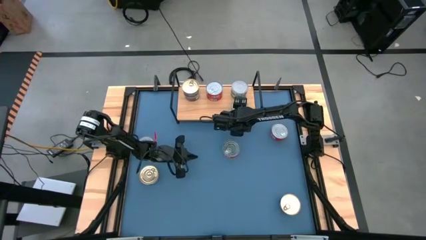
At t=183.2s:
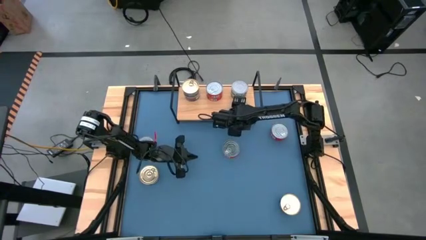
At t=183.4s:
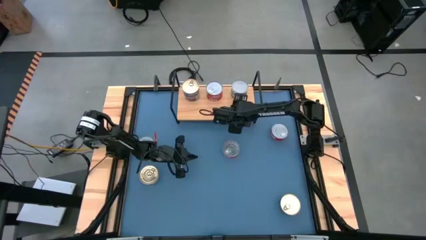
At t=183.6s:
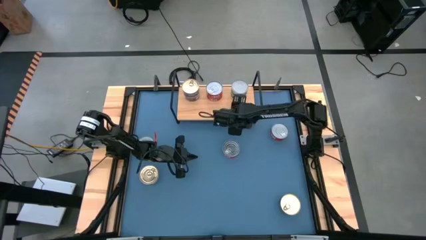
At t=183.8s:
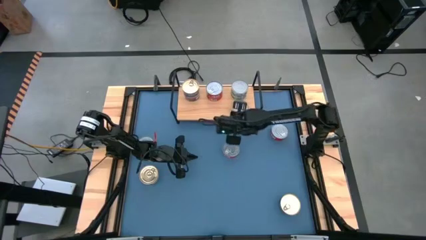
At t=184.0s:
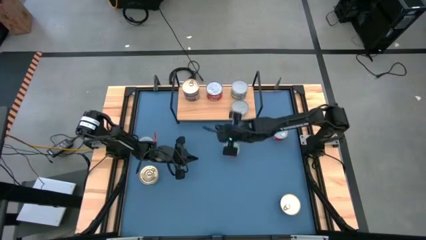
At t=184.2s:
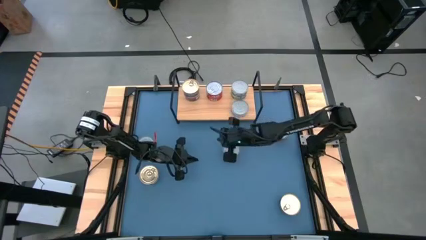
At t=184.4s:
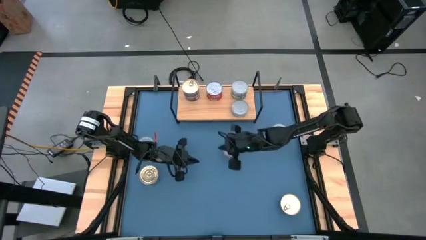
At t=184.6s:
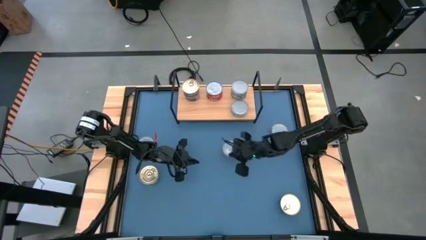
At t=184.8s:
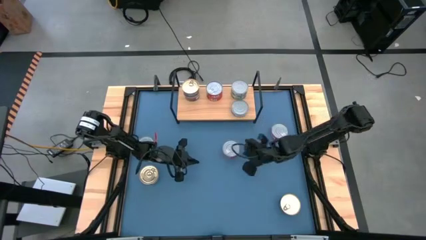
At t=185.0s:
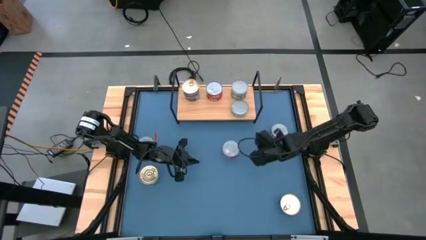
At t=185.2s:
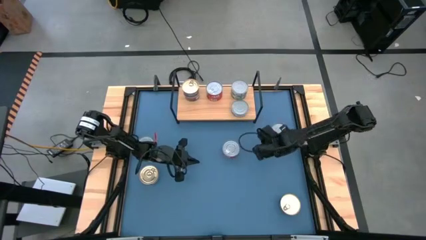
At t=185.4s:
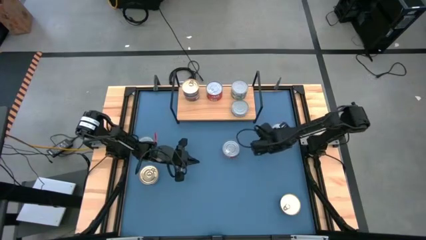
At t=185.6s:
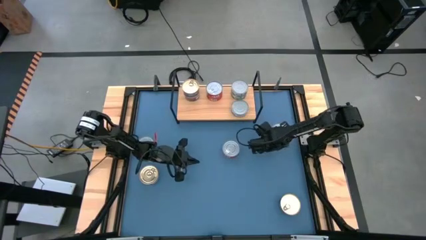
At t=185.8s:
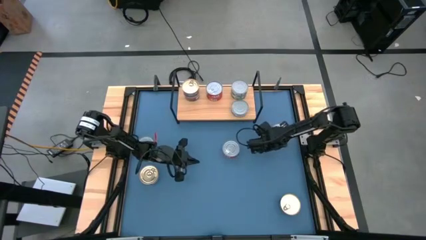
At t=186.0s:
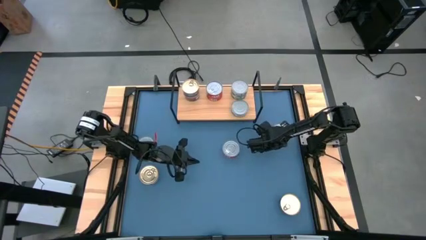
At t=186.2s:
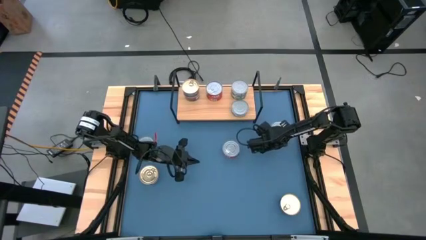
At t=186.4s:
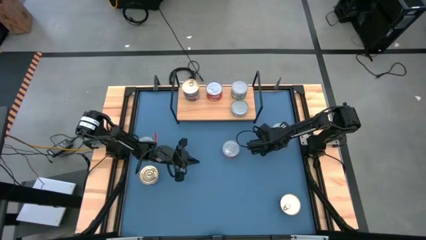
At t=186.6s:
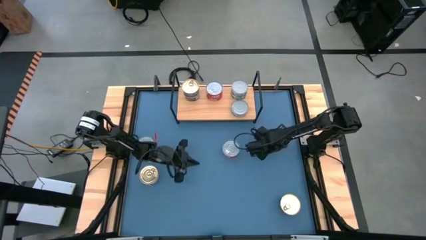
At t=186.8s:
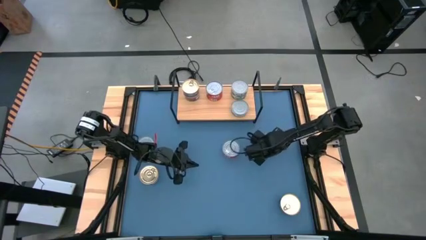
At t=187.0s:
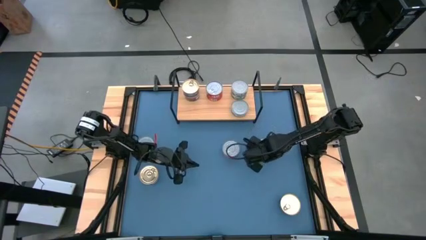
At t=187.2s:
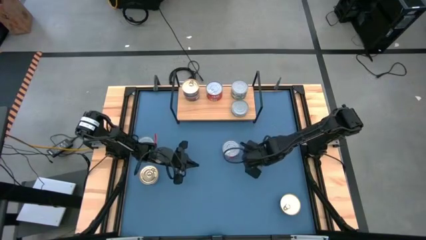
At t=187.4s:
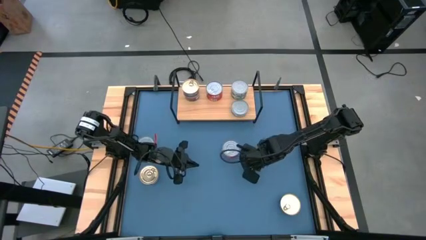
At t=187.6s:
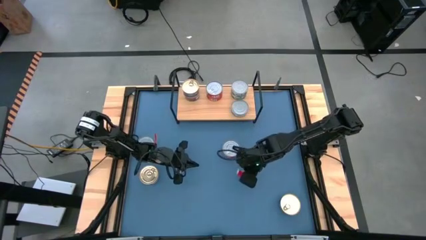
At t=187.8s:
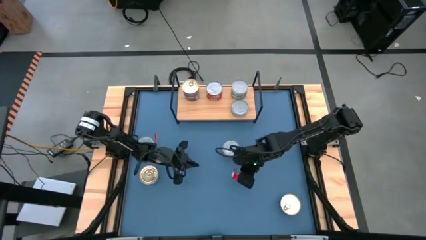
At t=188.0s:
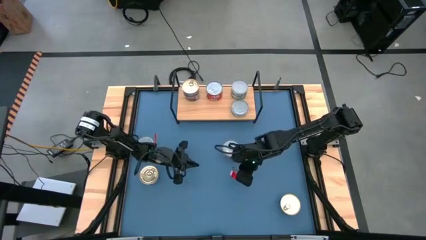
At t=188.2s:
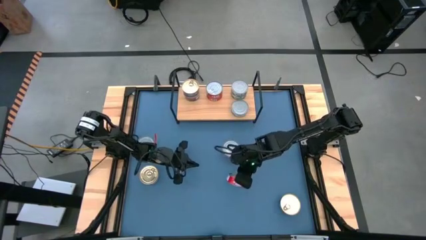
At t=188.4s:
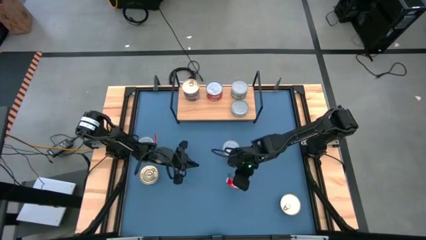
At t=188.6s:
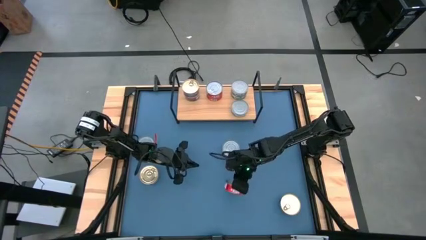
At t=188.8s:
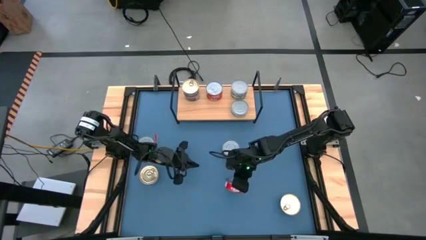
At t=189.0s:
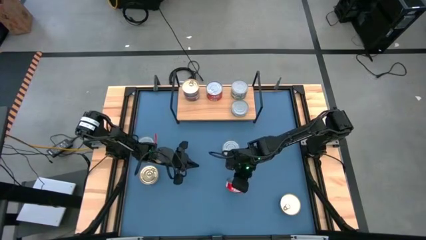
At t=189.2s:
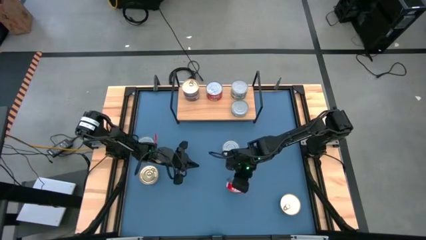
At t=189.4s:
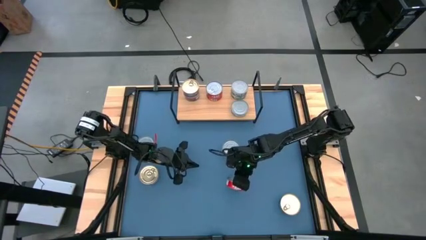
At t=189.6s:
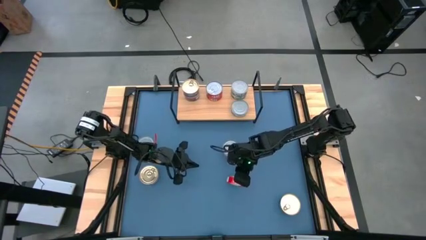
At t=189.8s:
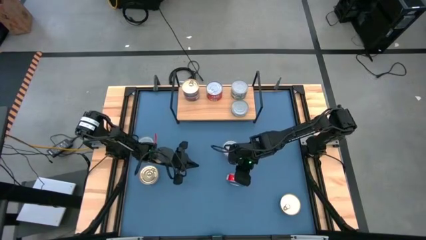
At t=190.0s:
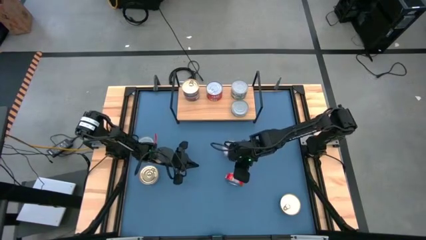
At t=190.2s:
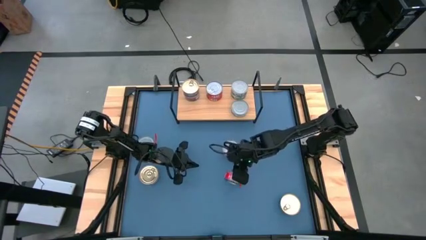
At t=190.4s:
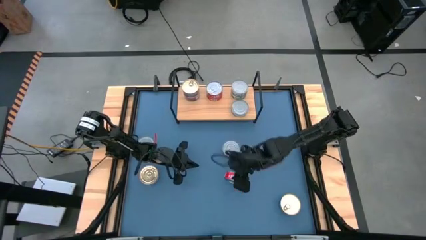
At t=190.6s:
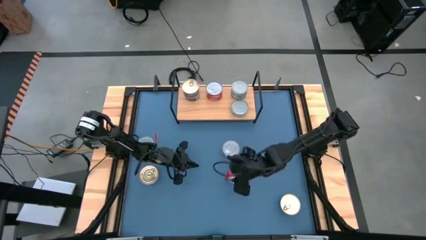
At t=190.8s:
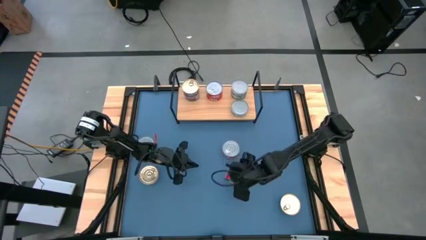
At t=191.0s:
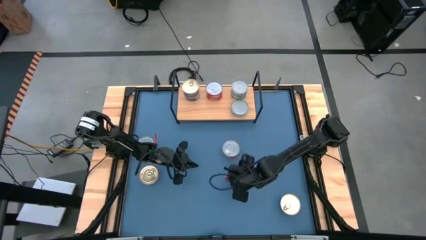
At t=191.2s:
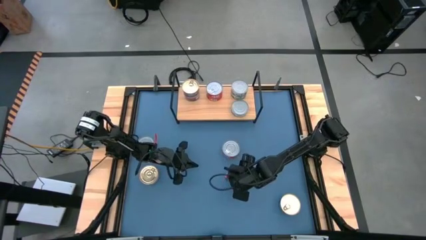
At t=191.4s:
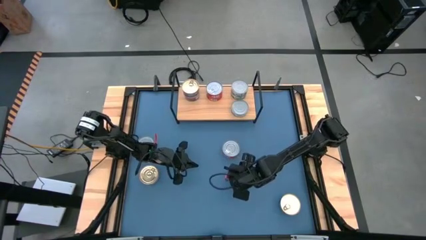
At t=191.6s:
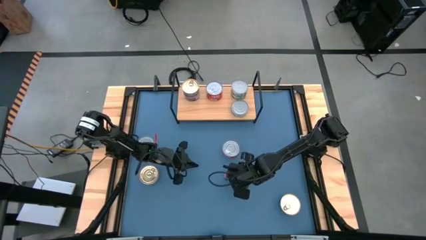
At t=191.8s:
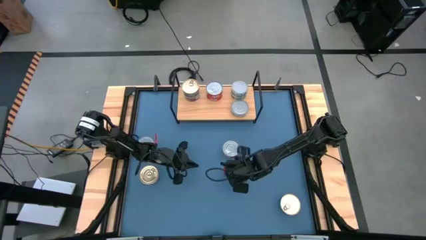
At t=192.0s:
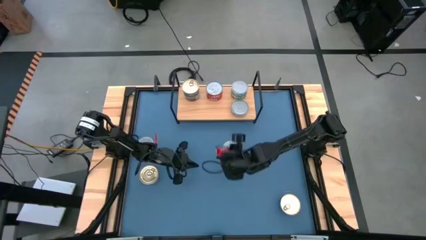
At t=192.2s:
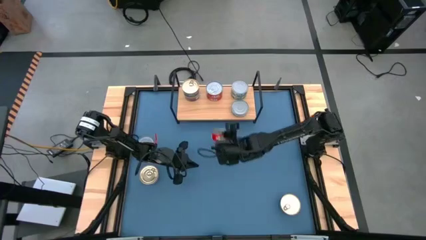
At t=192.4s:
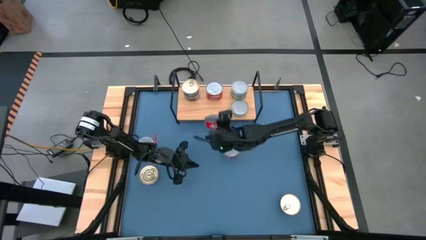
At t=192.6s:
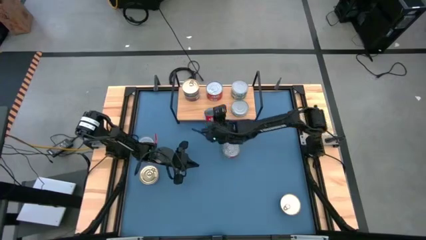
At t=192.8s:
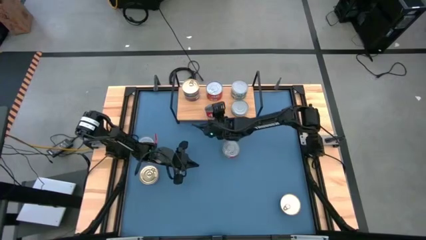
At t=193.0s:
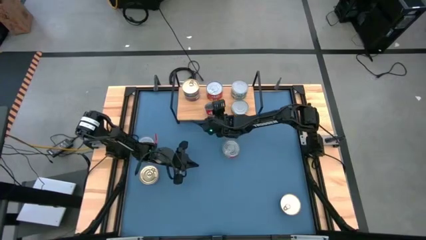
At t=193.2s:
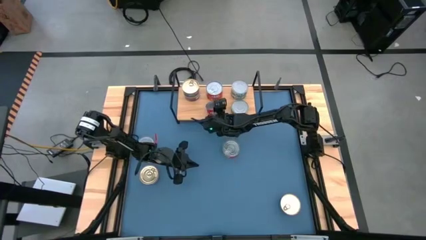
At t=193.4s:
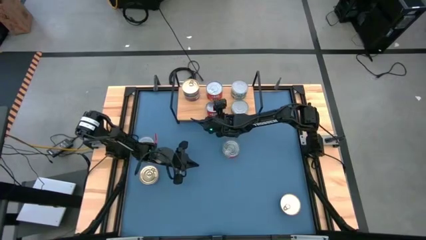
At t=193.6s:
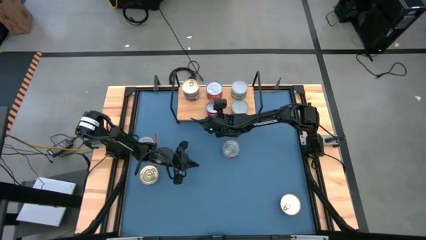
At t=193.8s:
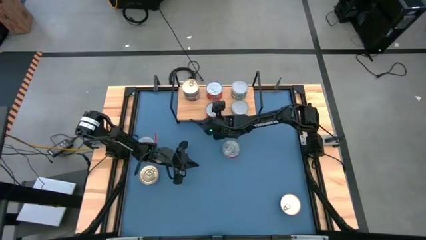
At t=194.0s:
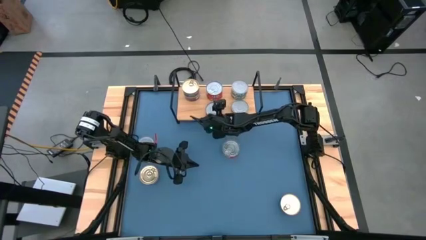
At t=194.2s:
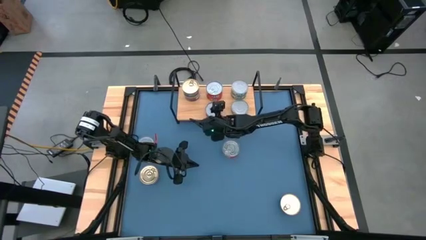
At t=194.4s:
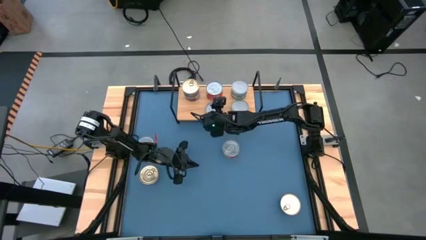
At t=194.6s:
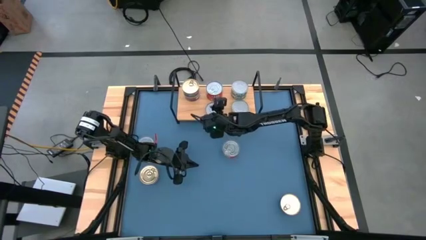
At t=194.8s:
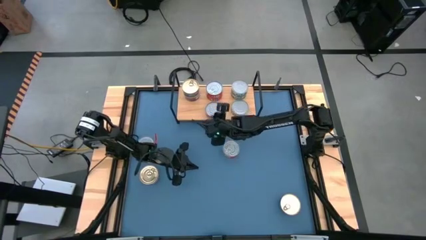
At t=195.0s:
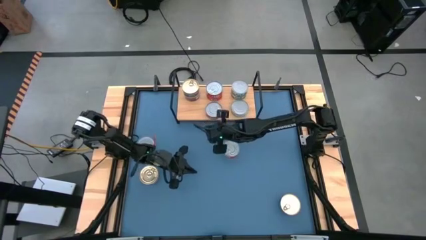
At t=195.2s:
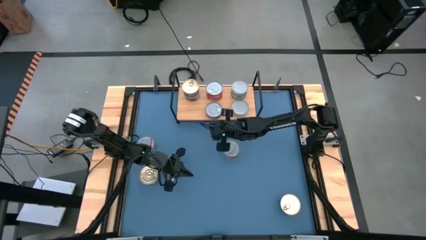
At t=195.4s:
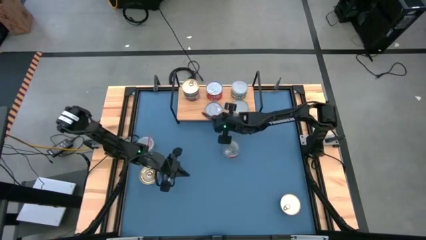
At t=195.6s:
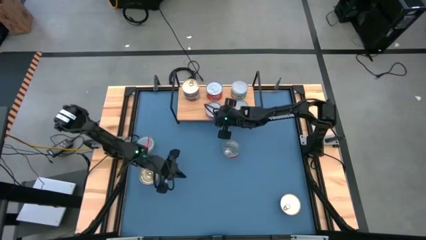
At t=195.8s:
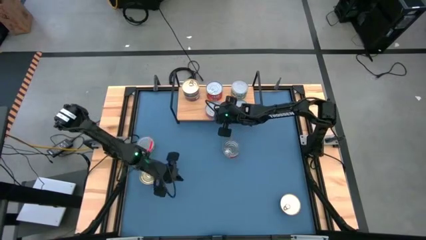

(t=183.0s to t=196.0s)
Task: Stack canned seafood by type on shelf
Put the red tuna can on the shelf aligned with the other red tuna cans

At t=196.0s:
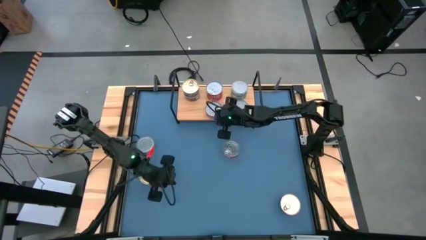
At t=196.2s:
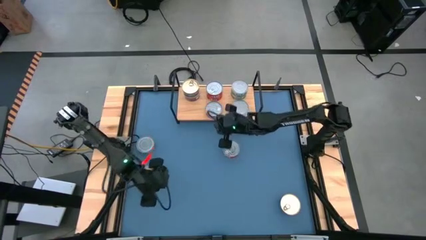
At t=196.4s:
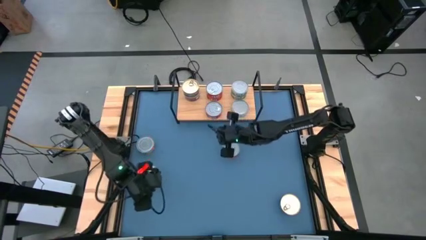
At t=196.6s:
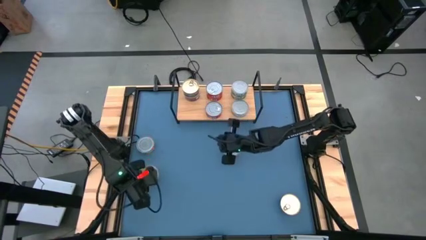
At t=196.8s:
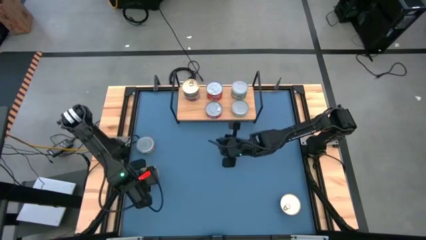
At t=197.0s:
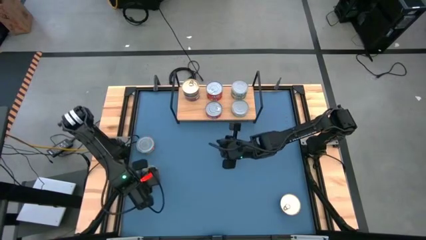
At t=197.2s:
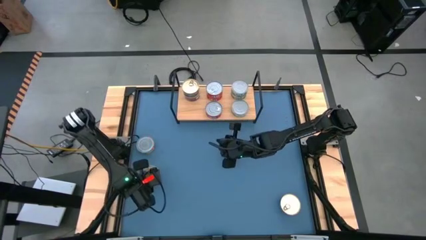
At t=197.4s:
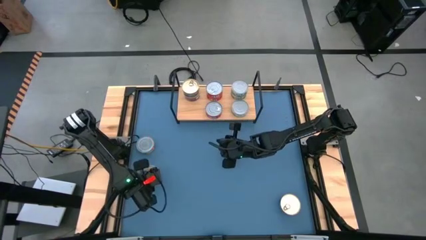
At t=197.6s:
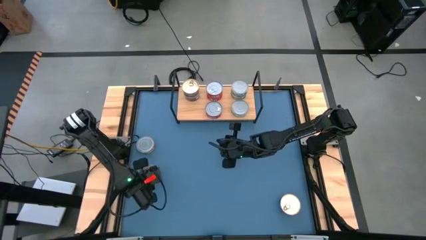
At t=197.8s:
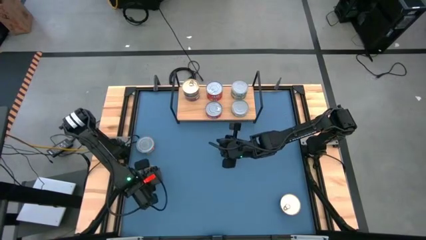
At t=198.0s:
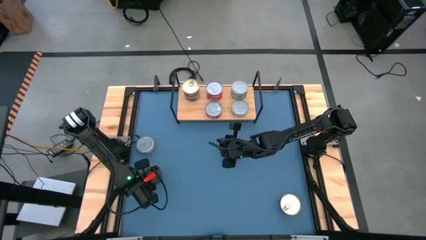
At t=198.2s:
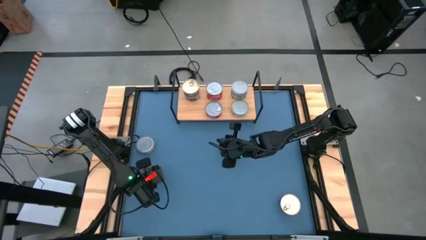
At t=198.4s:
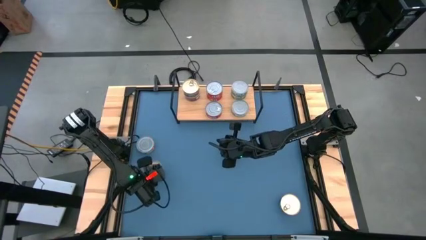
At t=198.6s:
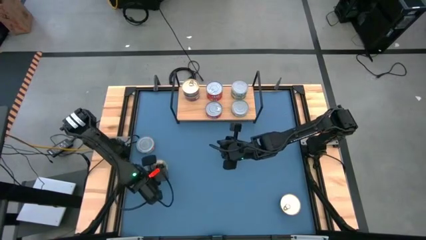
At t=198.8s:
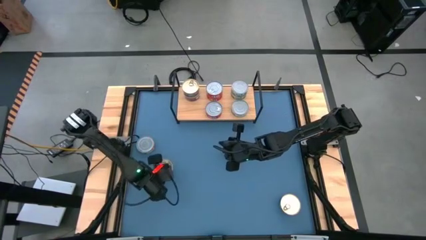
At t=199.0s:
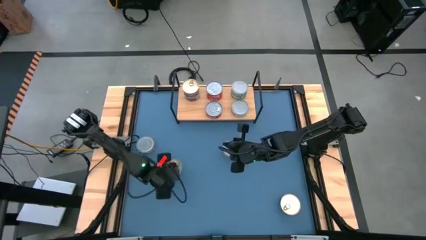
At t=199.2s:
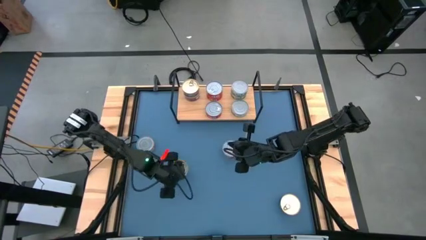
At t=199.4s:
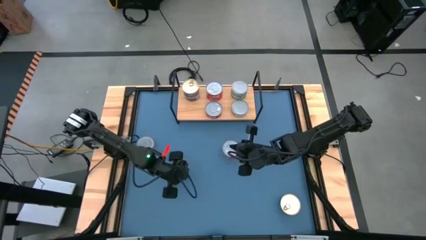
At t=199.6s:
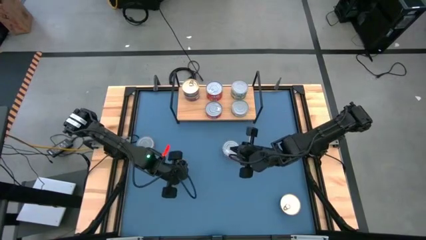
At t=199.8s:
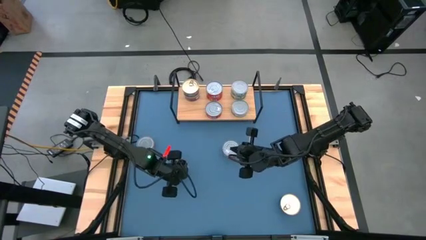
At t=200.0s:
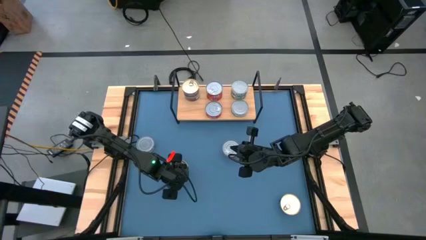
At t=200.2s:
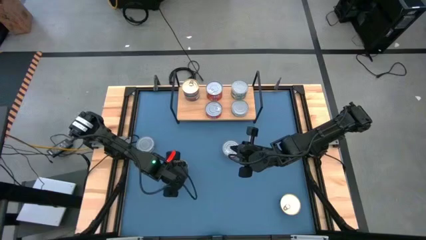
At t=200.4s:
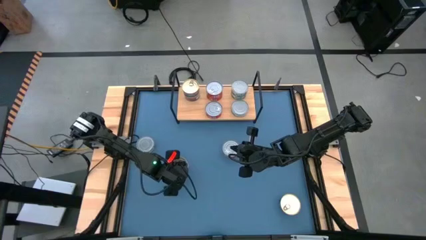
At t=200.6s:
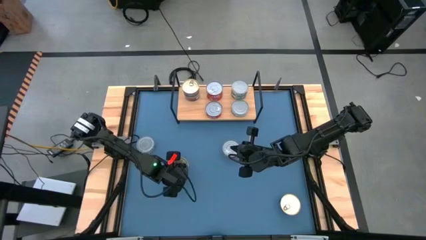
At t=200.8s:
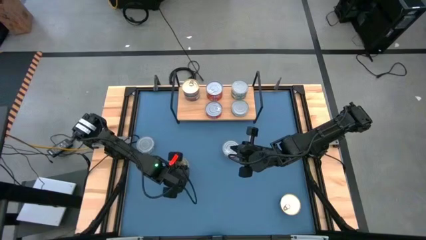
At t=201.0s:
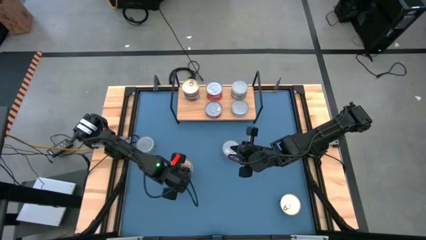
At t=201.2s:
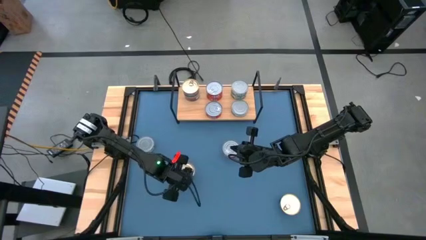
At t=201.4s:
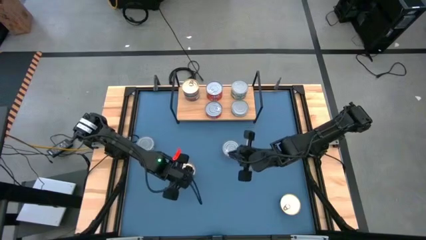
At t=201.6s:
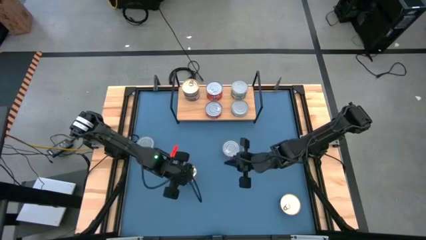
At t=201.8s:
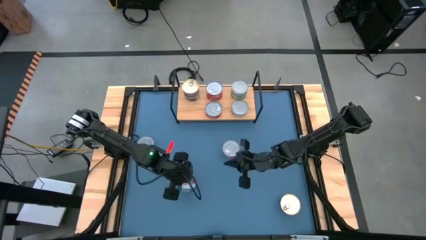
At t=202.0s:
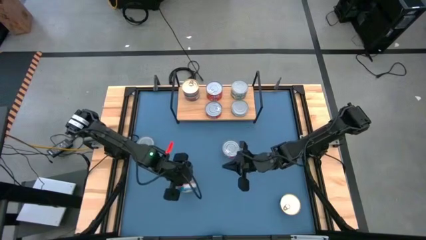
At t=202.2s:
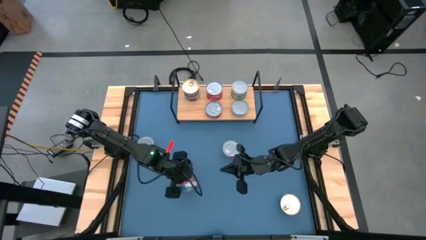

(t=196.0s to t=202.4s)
Put blue tuna can on the shelf
